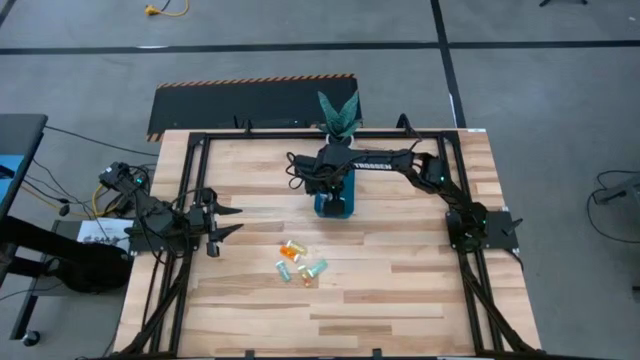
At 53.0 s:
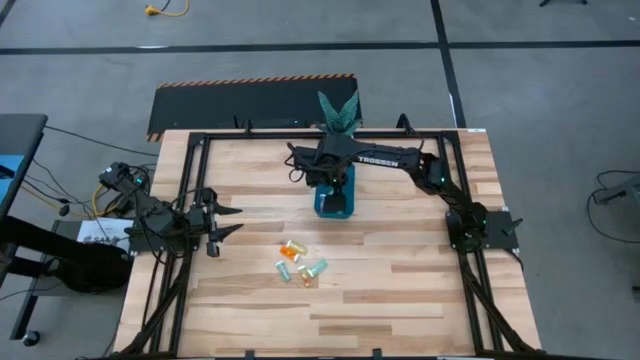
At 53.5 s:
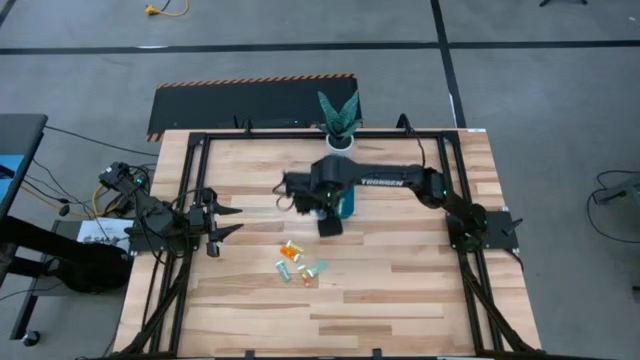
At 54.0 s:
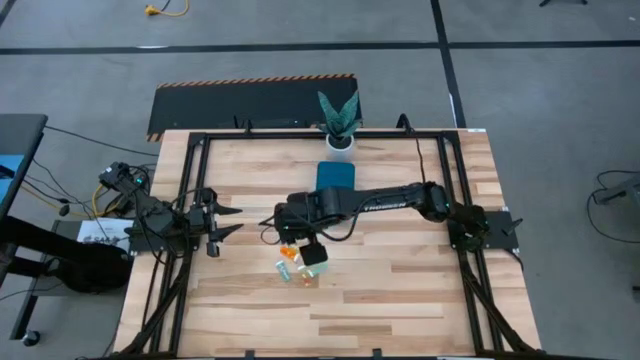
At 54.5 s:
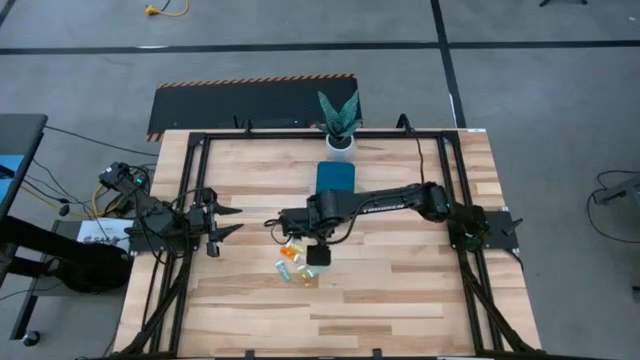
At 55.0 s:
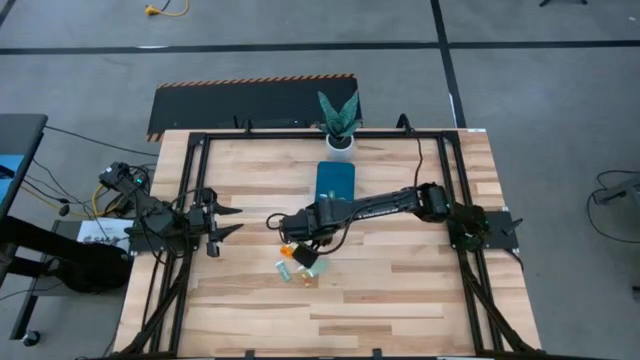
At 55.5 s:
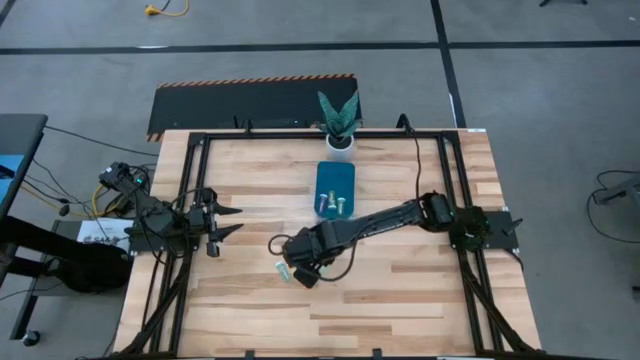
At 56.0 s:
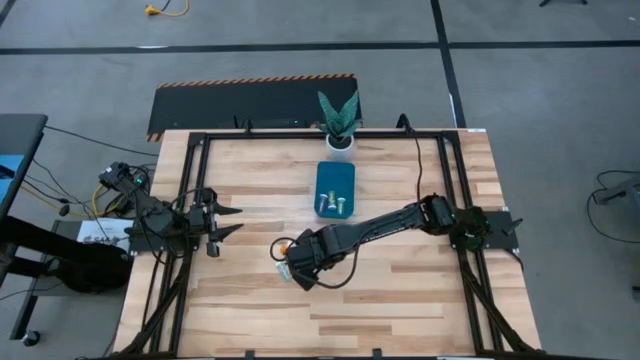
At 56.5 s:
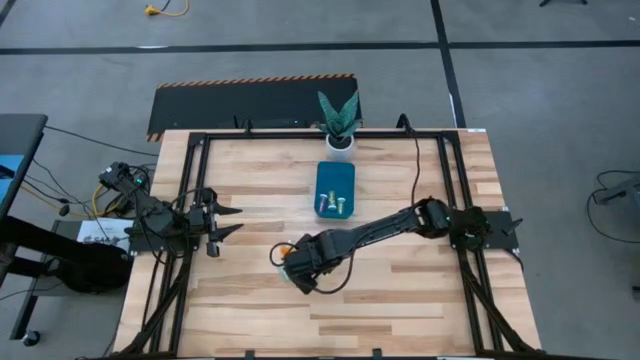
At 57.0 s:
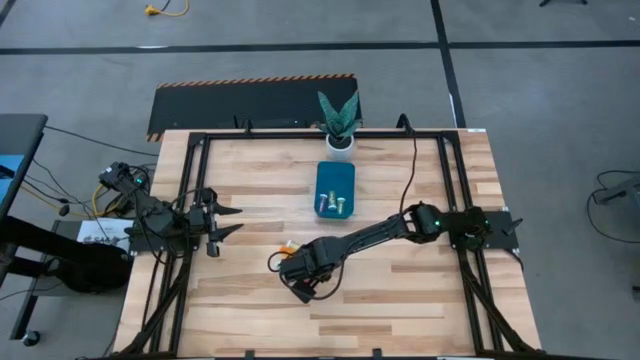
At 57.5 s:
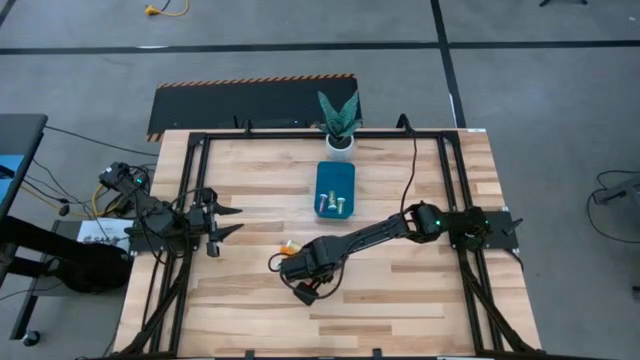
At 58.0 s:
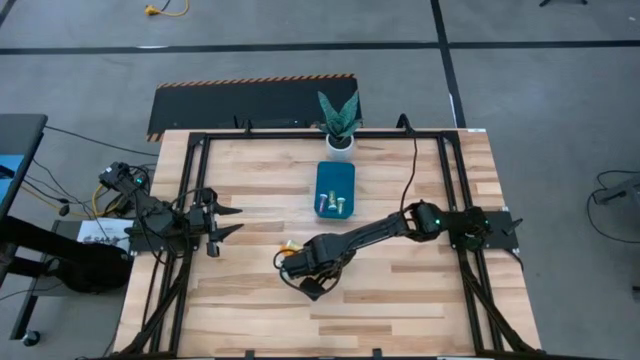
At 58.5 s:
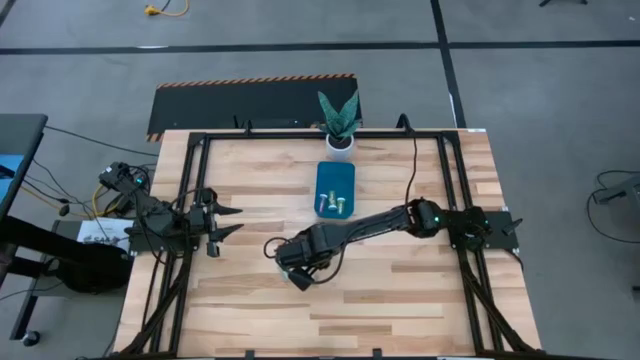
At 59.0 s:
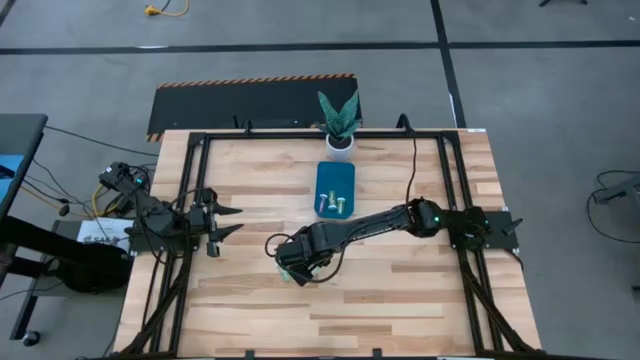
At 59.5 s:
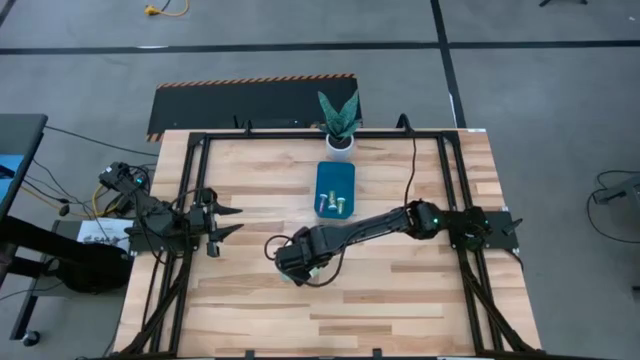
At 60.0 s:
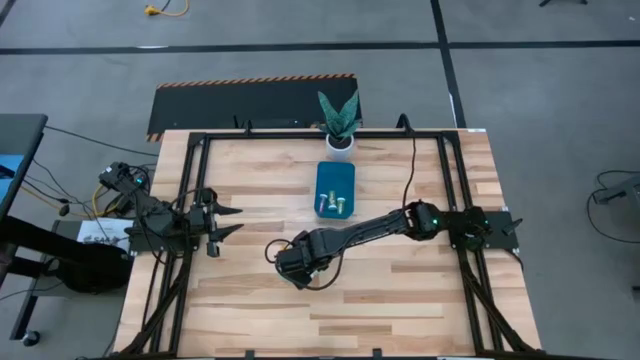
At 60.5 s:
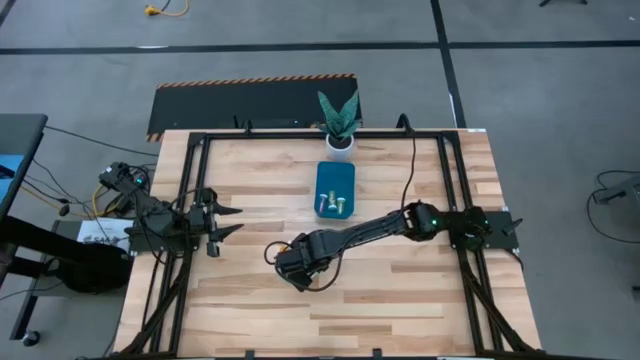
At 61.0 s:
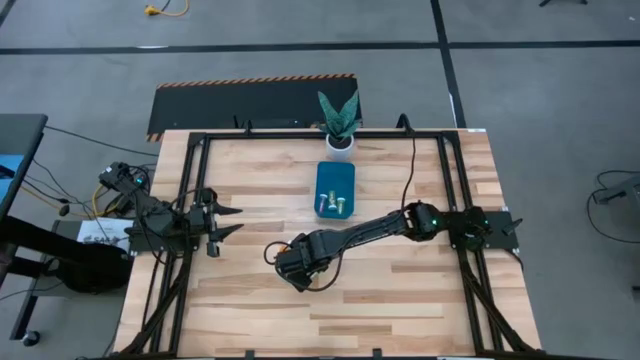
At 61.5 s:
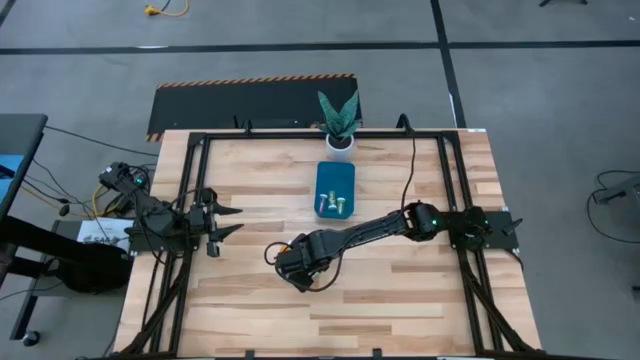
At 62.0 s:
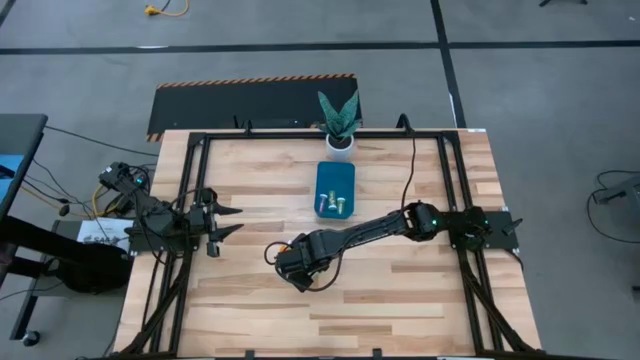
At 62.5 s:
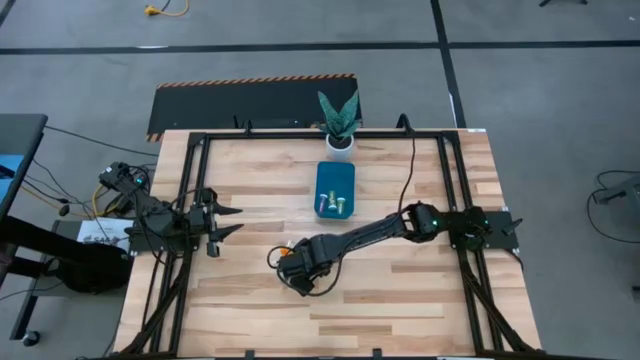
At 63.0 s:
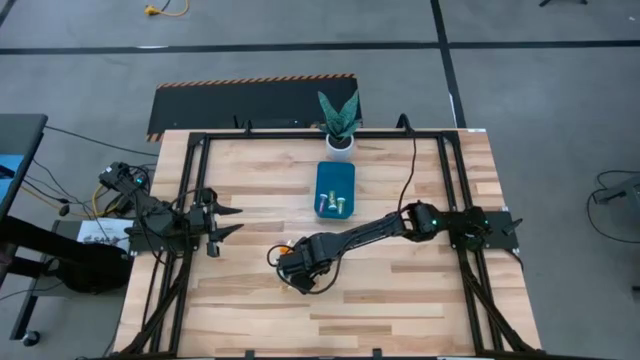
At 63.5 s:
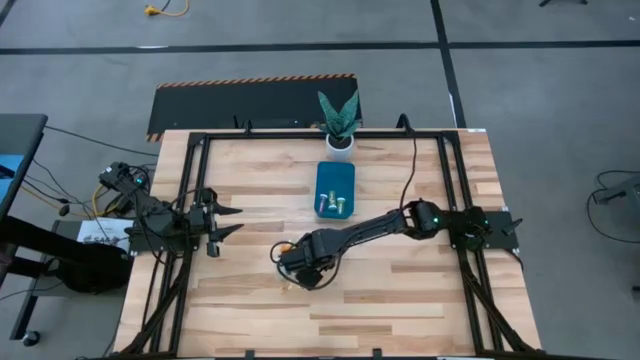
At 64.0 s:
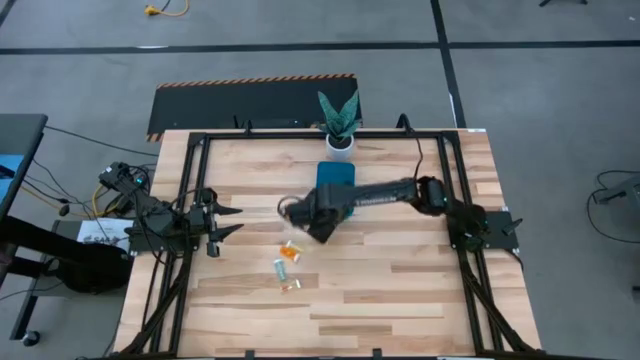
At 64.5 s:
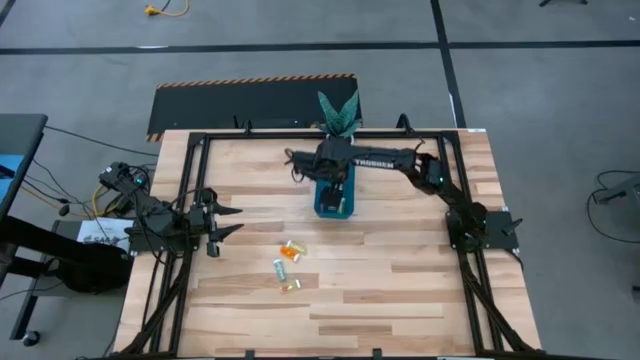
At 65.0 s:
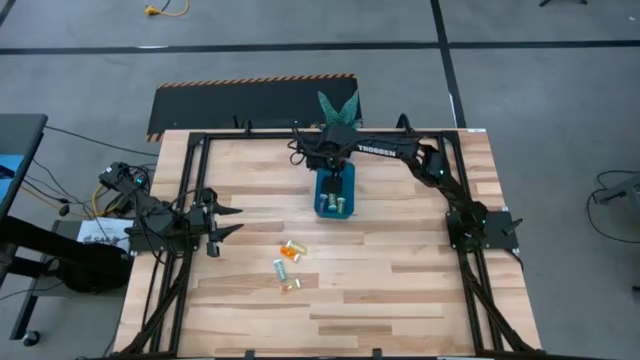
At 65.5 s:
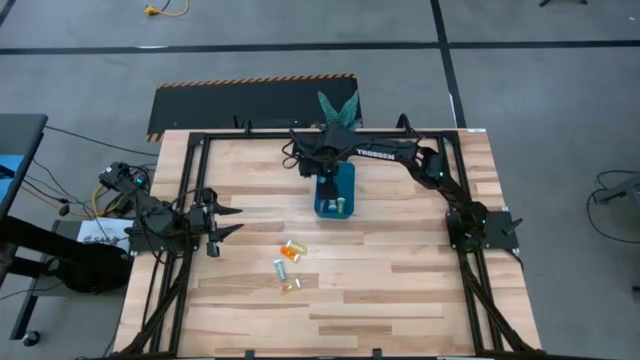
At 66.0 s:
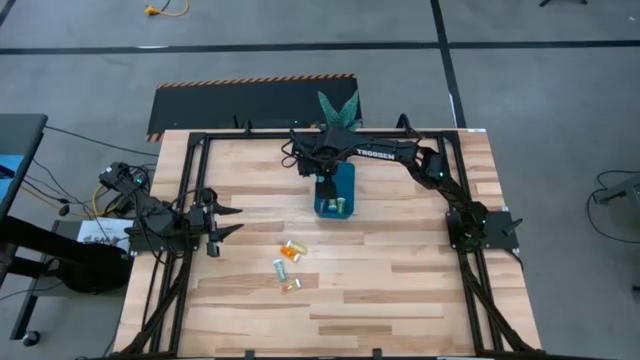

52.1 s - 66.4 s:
Task: Pick and place pill bottles into a basket
Put the right blue pill bottle into the bin

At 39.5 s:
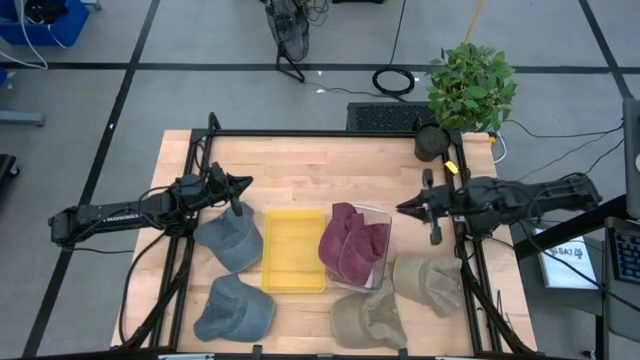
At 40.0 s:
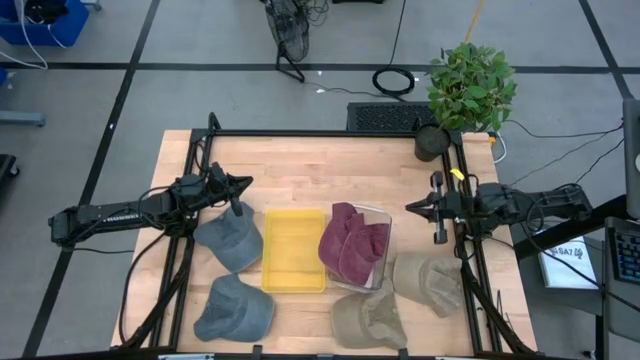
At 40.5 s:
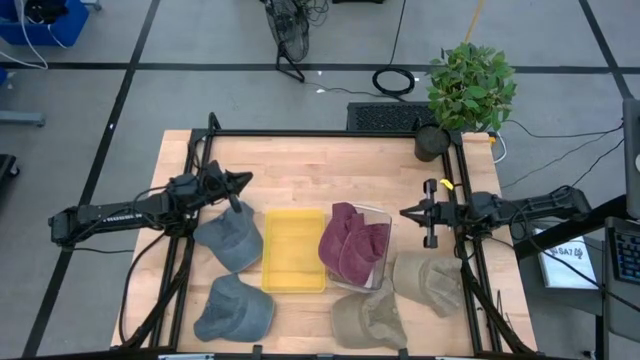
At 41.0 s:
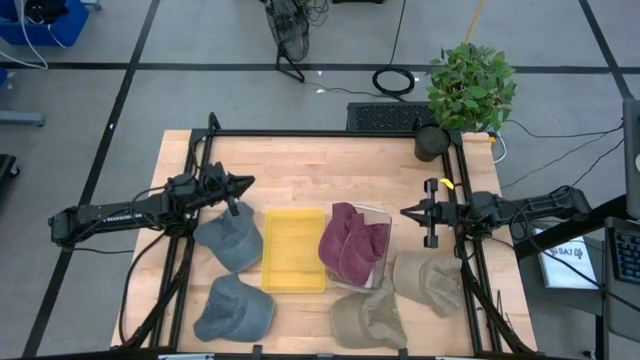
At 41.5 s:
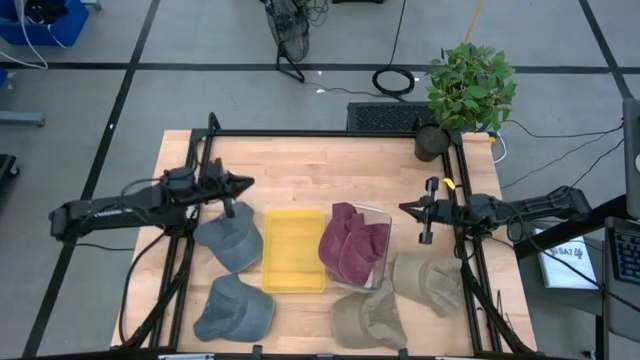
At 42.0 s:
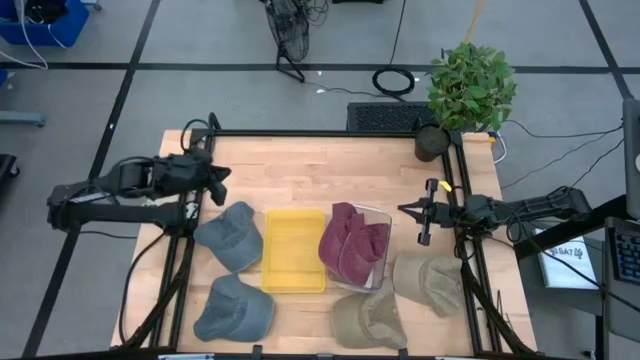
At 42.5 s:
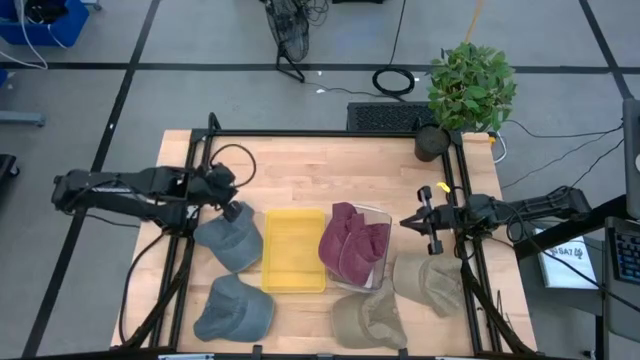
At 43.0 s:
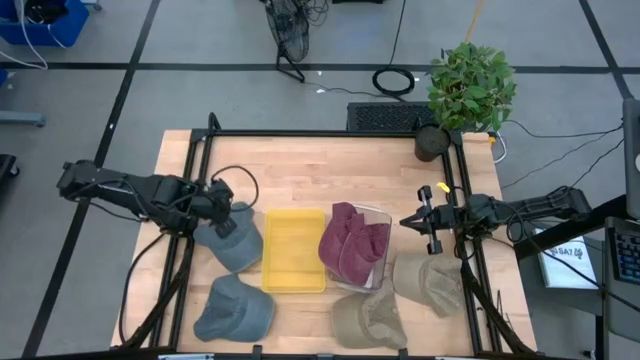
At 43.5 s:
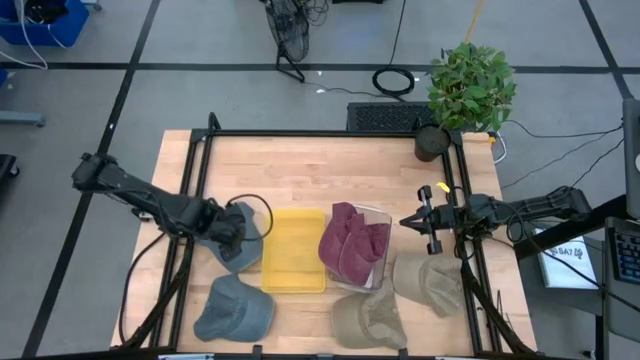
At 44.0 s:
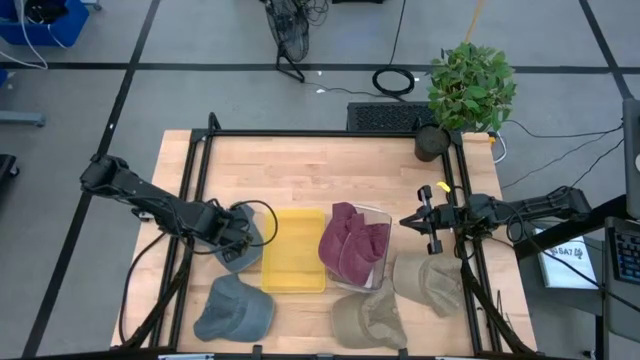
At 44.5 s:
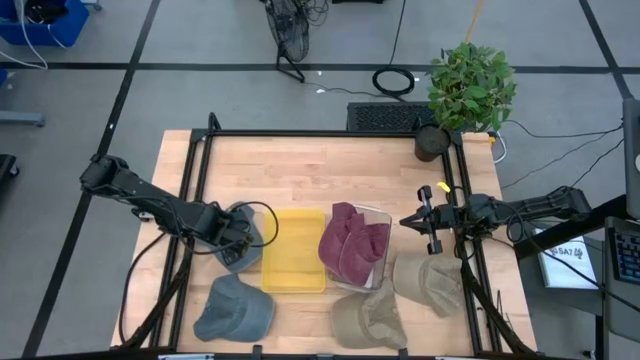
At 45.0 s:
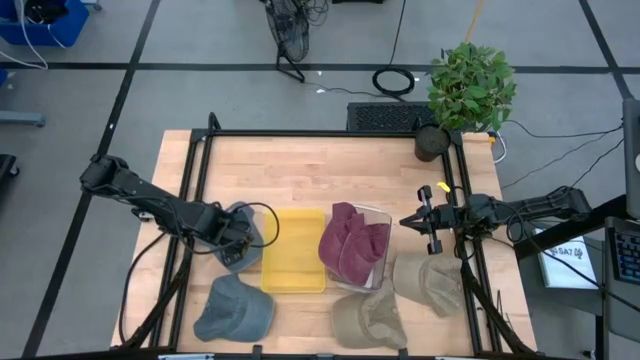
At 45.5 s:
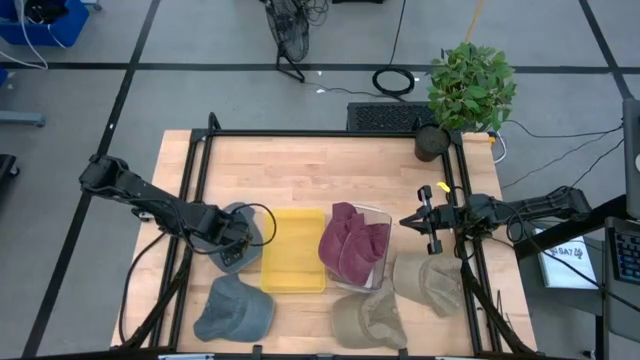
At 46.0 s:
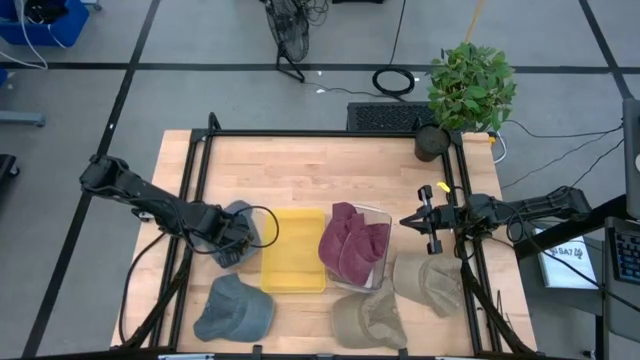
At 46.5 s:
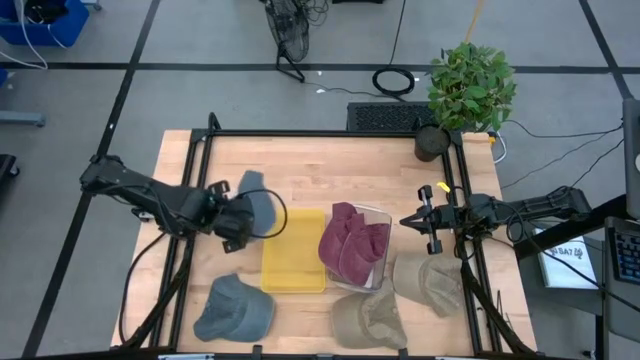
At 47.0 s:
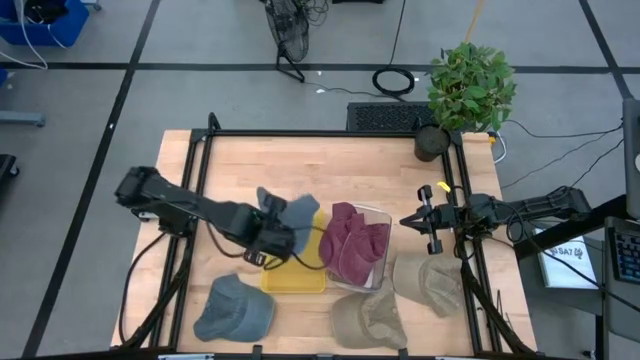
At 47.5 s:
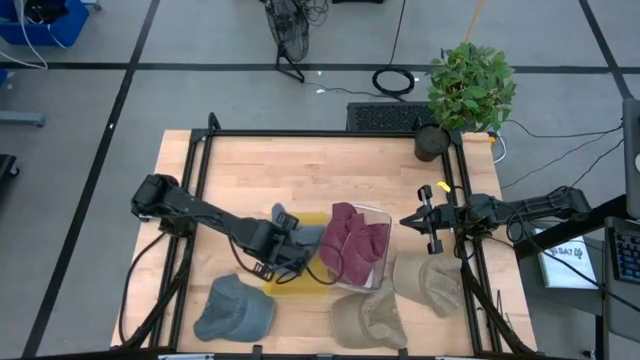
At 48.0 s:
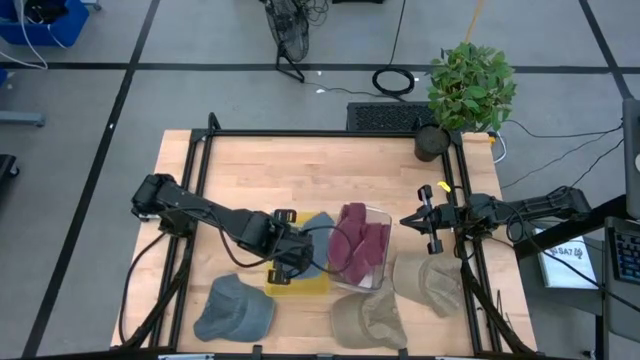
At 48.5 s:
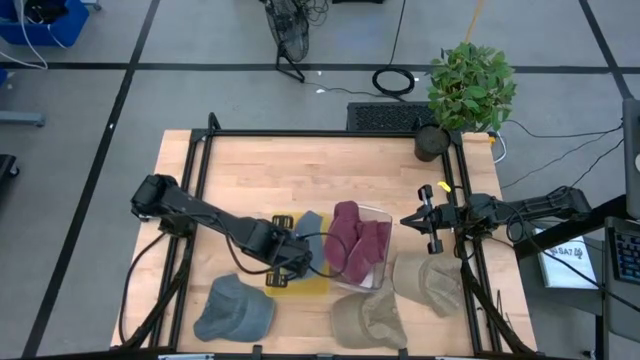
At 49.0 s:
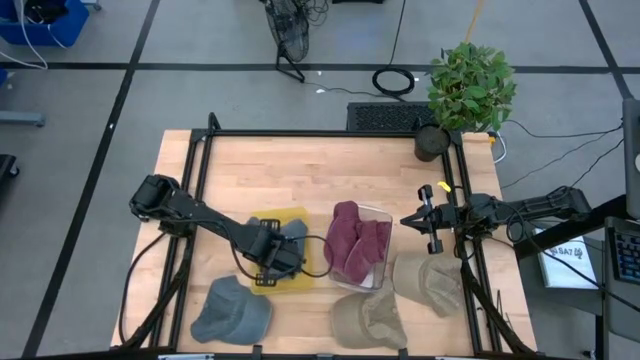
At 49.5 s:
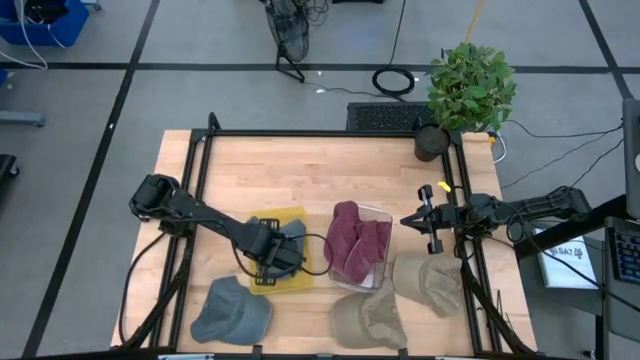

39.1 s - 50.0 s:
Task: Pick & Place hat
Put the top blue cap into the yellow bin
